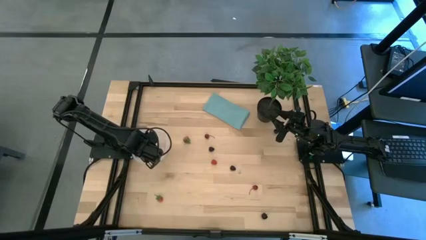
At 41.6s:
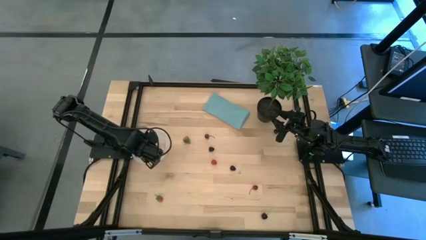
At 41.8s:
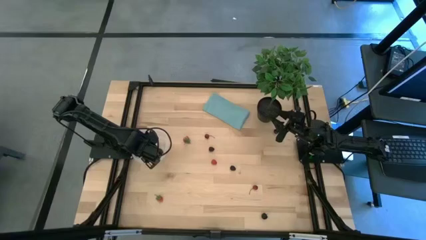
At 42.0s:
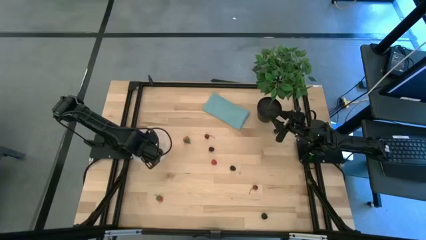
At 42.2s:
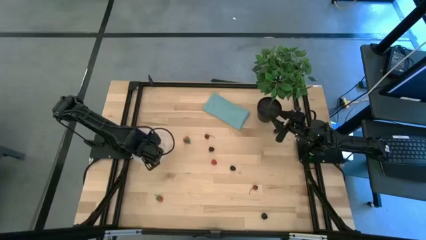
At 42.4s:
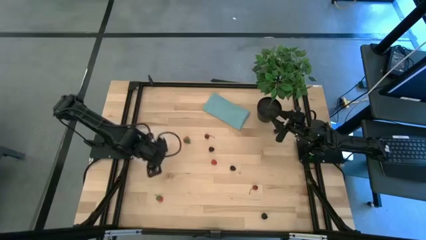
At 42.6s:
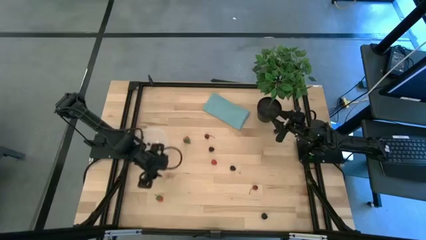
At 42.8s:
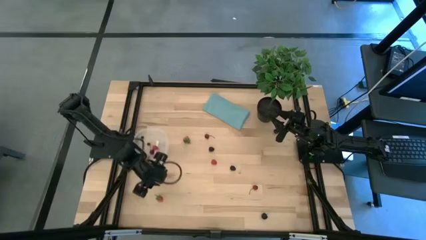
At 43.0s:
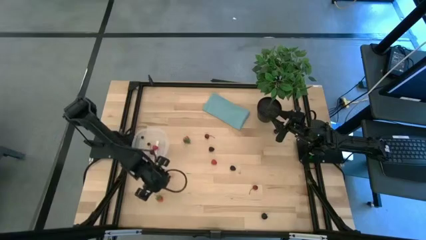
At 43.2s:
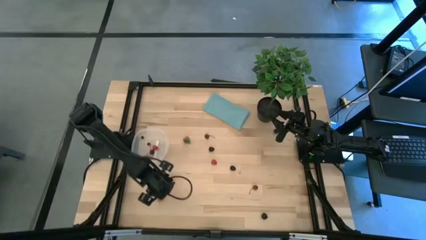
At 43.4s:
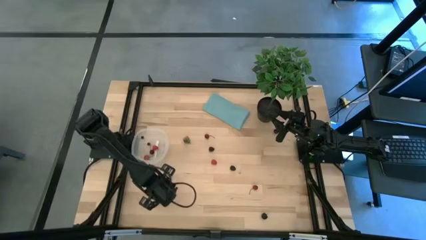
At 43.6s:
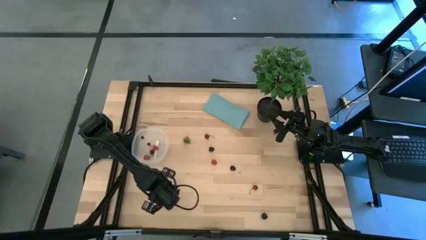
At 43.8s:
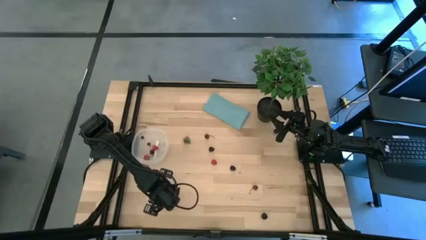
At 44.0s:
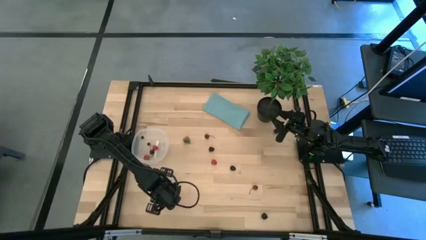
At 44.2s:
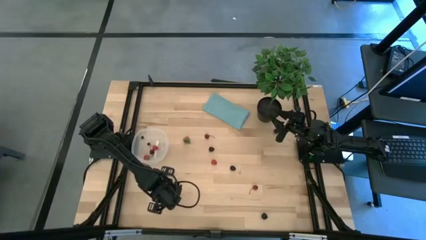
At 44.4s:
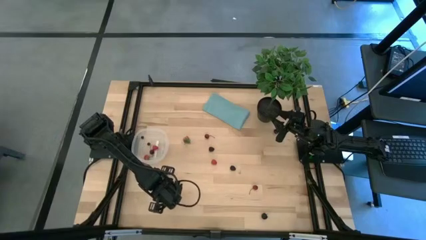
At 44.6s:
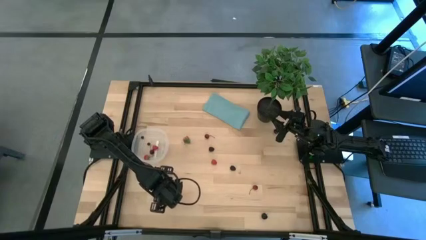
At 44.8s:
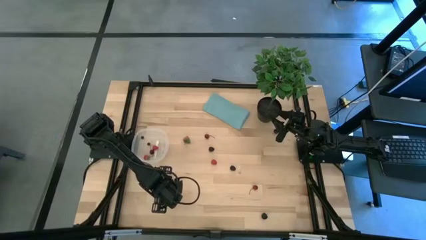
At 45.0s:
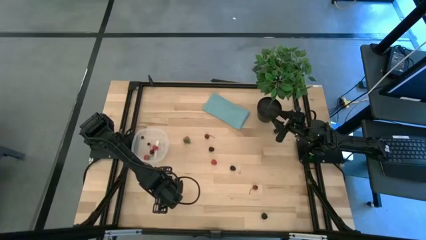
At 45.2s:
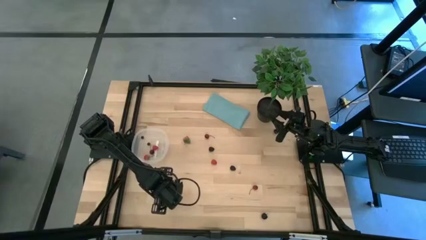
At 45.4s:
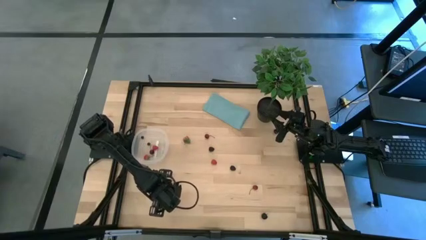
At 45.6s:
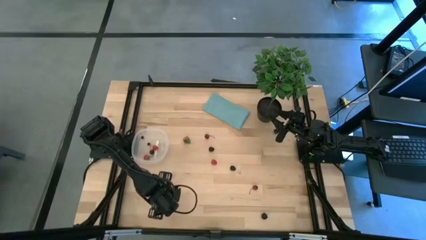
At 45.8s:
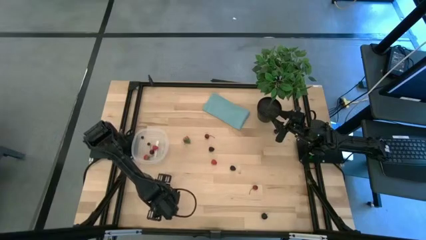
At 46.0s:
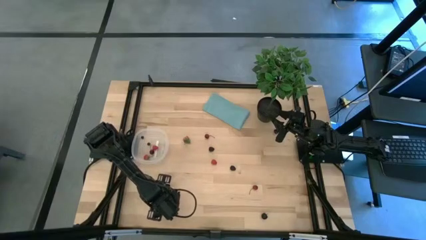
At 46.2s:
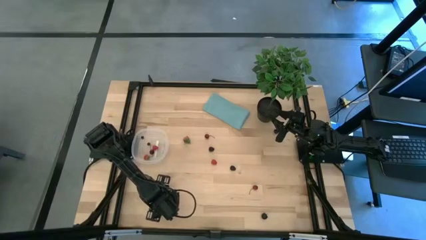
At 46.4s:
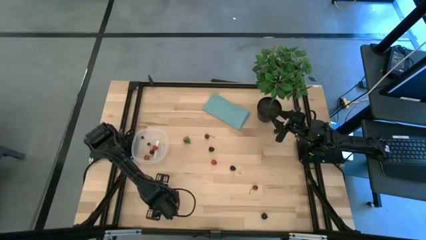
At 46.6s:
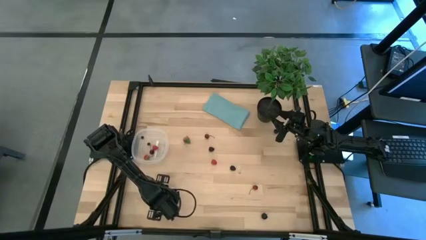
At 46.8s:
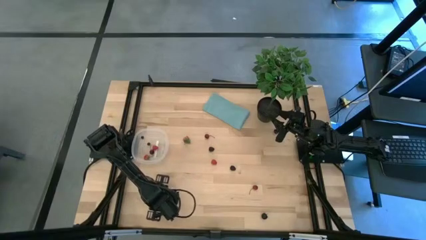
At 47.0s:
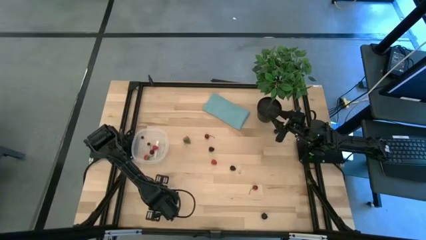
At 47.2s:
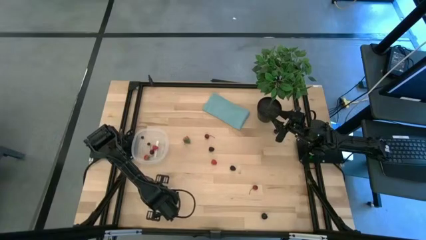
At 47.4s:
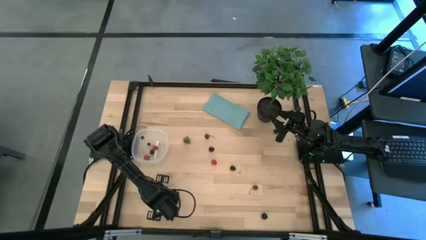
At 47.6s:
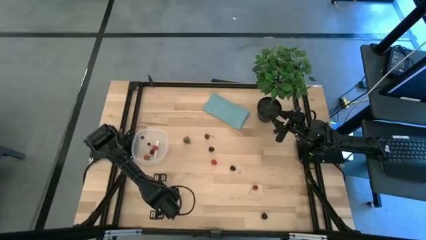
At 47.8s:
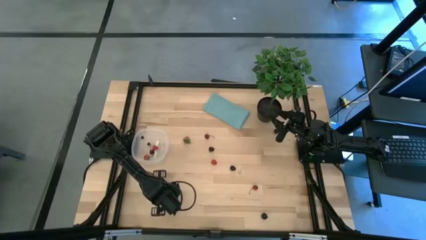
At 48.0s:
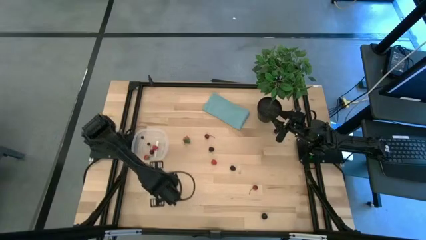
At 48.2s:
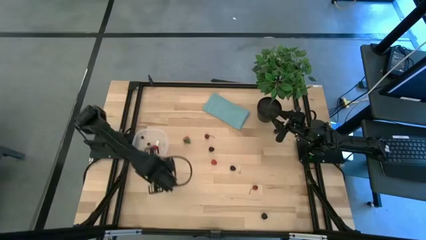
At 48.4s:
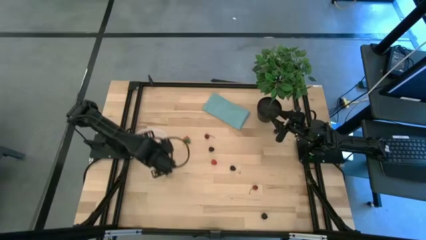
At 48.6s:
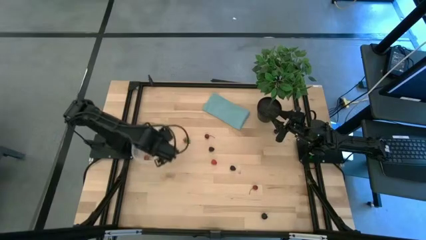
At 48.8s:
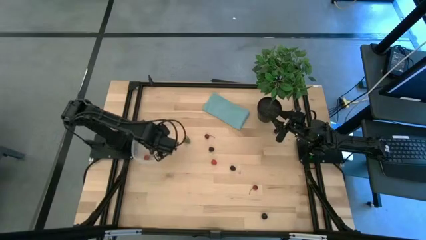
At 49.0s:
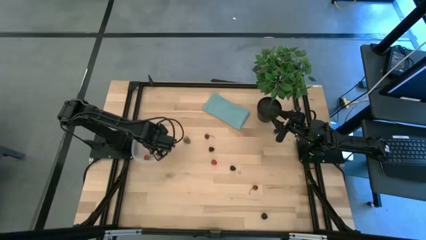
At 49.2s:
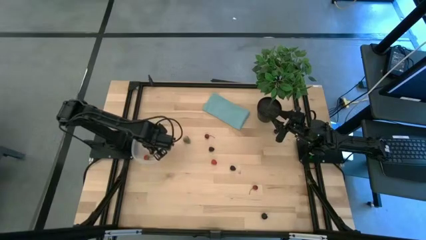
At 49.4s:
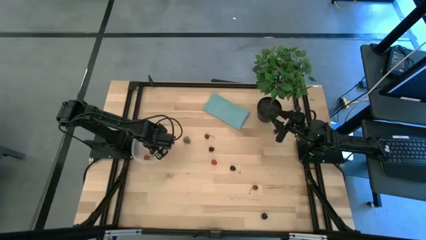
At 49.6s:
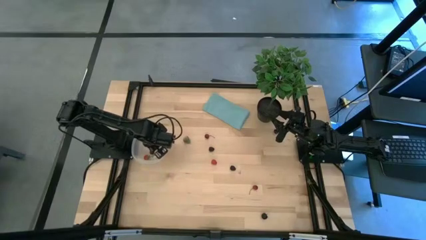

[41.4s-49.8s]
Task: Pick and placing Produce into tupperware
Put the bottom red strawberry into the transparent bin

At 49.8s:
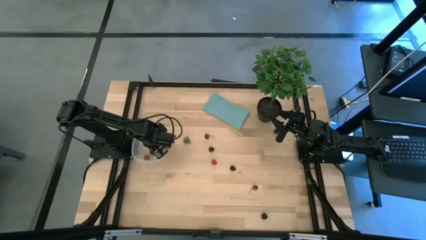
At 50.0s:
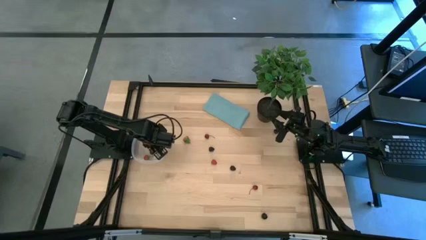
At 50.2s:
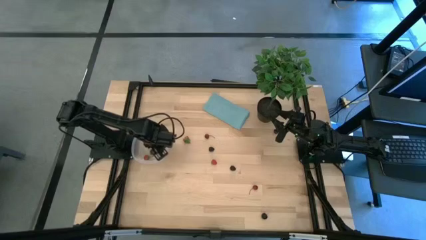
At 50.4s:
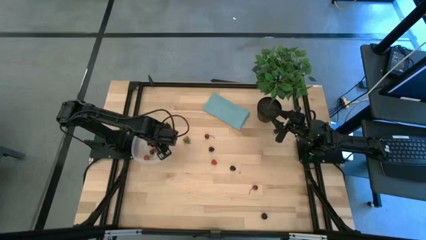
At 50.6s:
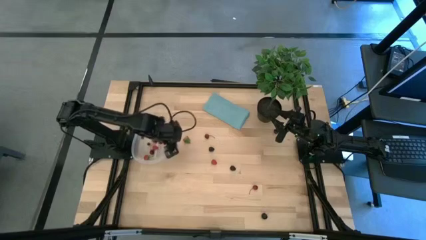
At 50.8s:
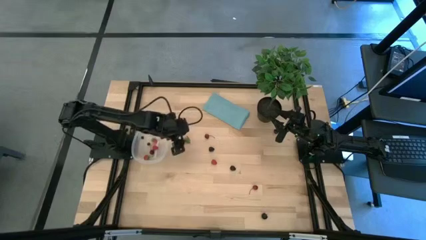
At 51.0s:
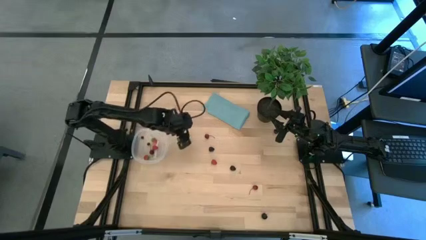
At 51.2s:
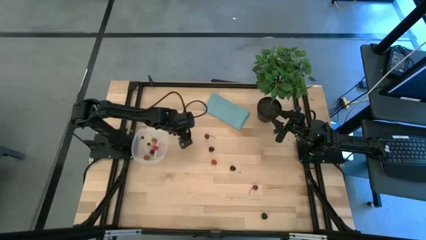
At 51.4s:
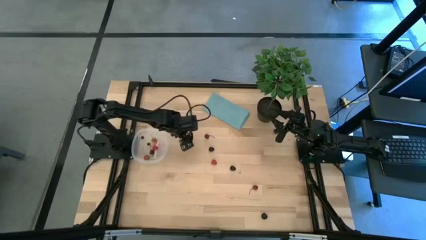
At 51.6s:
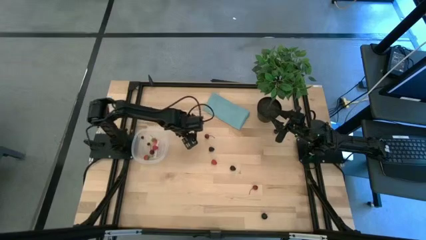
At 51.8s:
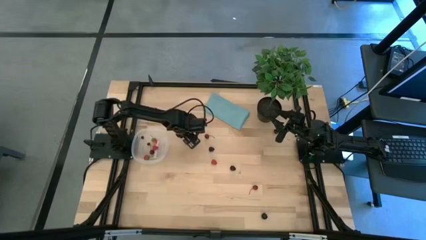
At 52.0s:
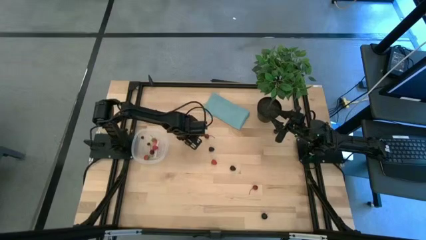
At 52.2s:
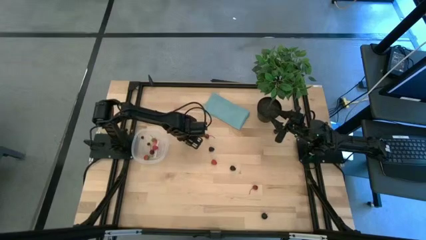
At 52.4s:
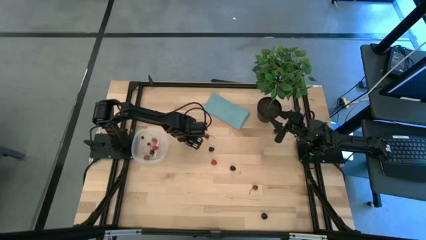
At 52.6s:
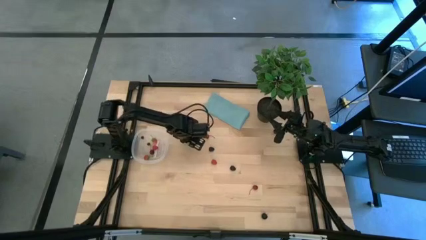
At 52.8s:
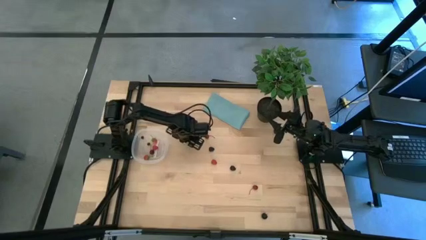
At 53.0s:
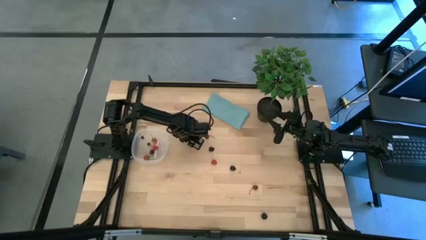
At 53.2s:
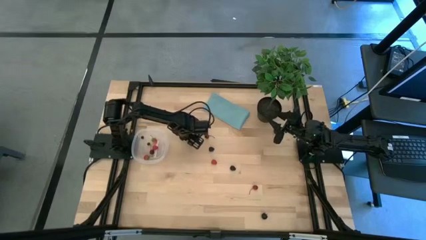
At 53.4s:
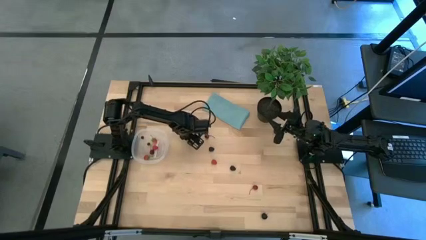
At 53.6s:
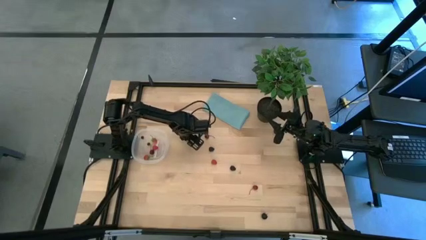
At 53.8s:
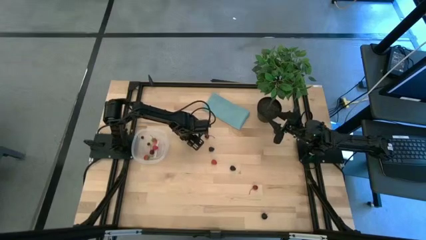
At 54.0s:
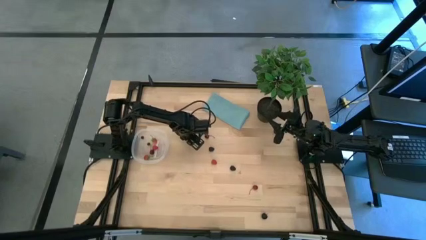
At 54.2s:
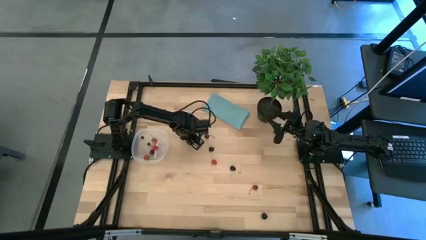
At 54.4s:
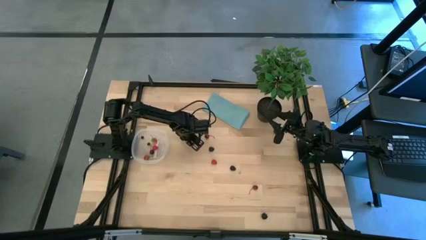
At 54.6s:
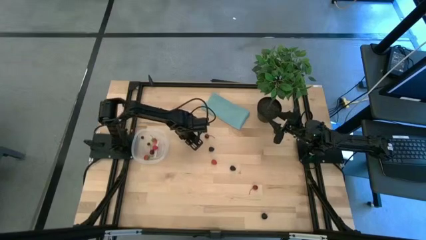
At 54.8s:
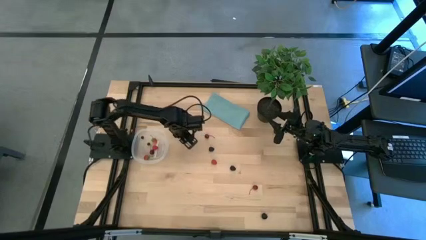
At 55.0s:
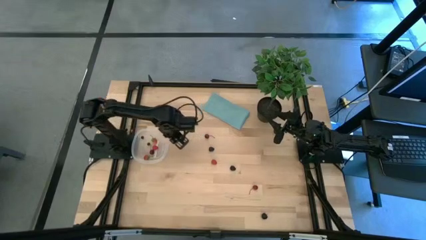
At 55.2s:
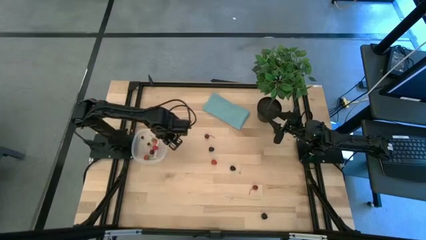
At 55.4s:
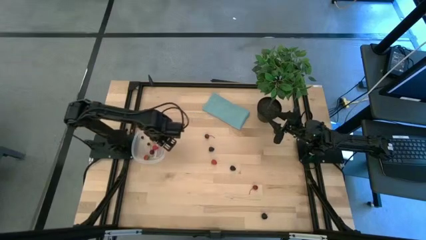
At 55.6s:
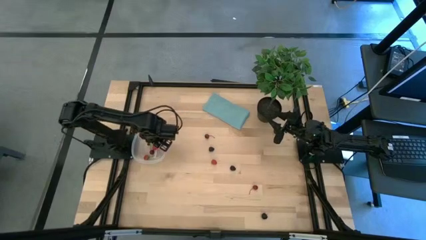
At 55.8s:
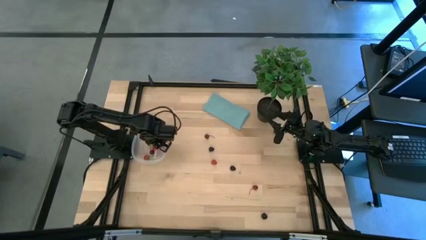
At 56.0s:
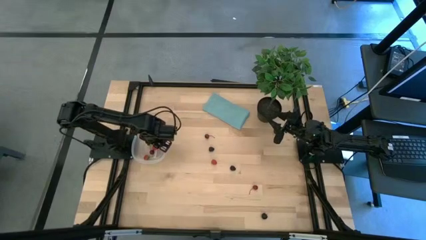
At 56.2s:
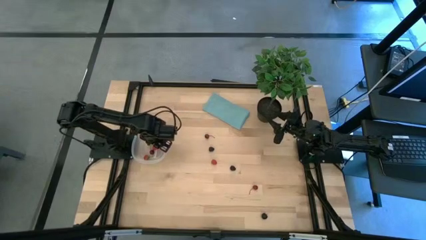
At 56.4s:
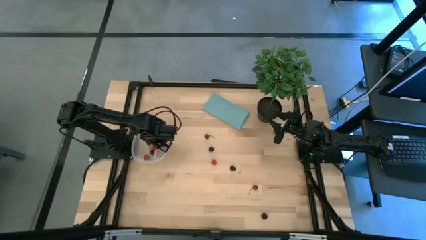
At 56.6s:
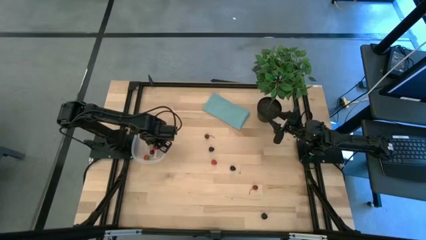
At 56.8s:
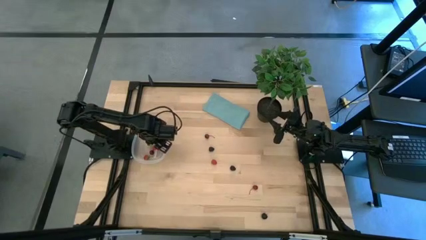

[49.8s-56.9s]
Put the red strawberry into the transparent bin

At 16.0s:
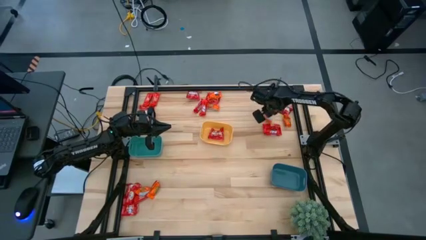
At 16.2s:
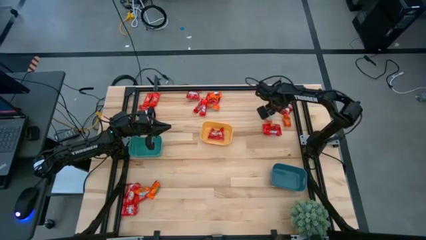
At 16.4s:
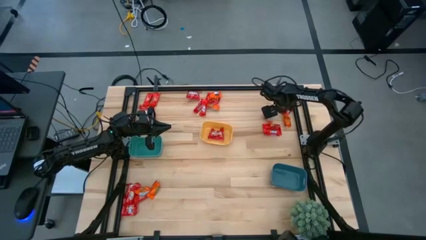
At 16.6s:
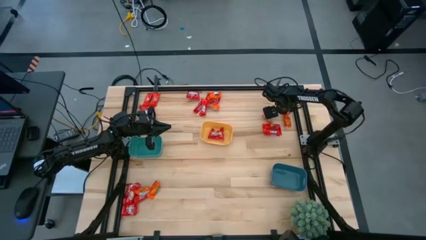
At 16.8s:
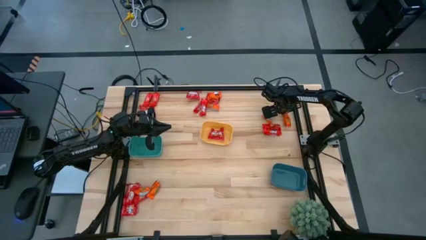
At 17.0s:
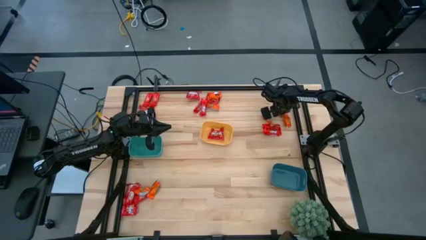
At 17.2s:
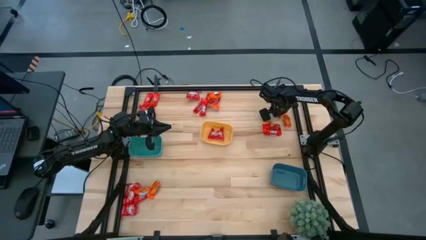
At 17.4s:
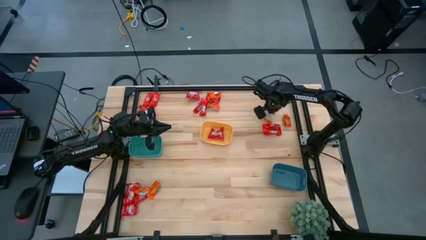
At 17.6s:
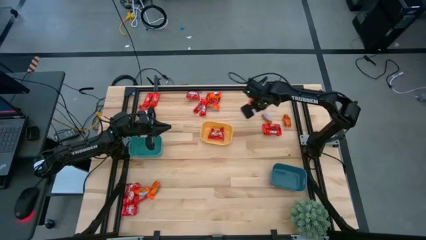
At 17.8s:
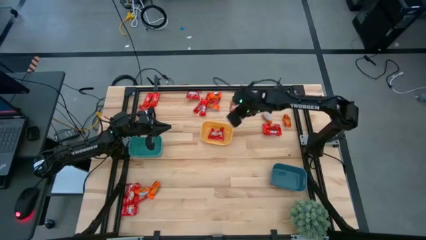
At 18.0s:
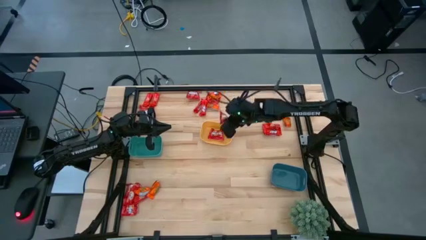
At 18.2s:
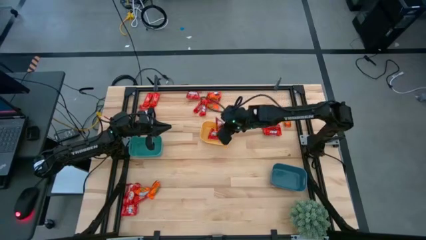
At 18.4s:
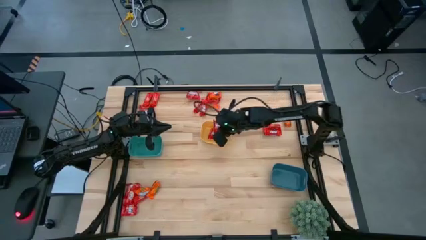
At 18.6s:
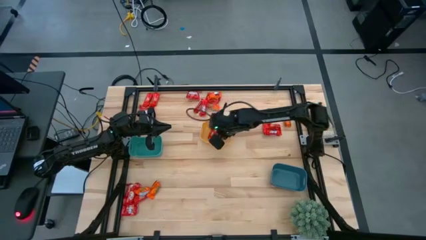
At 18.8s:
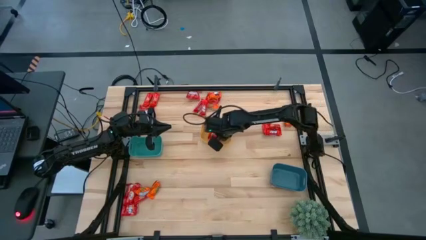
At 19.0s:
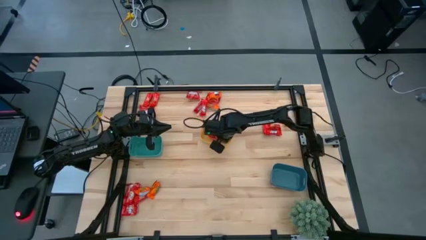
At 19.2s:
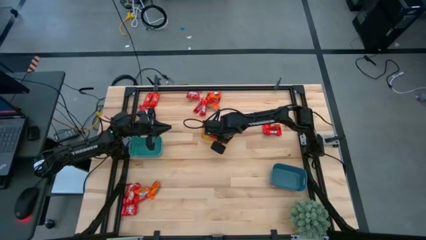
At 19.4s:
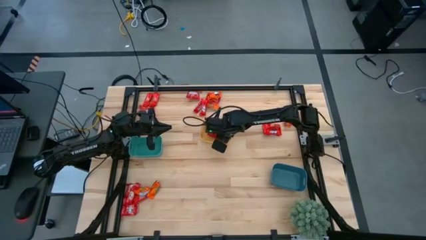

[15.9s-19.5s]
Task: Sort candy
Put the red candy into the yellow bin
